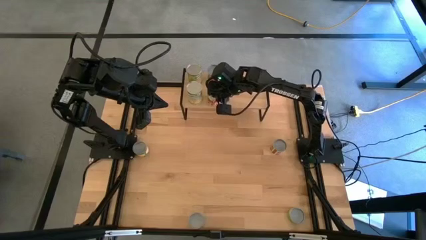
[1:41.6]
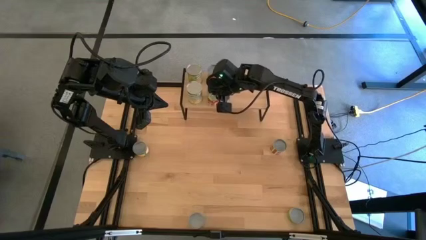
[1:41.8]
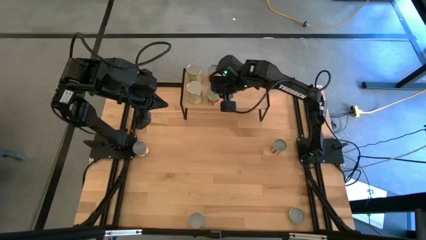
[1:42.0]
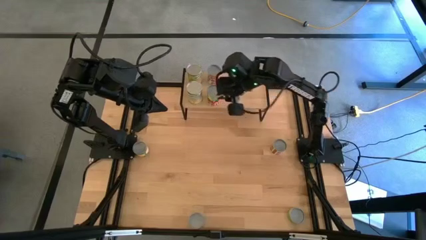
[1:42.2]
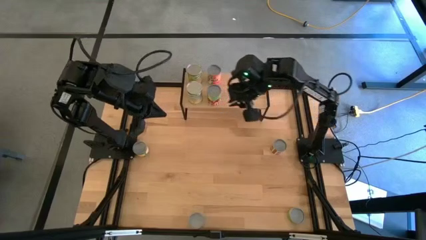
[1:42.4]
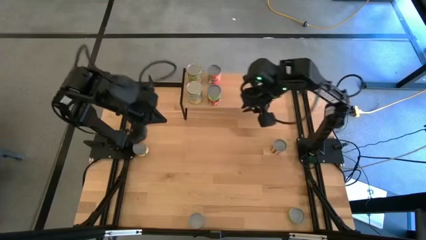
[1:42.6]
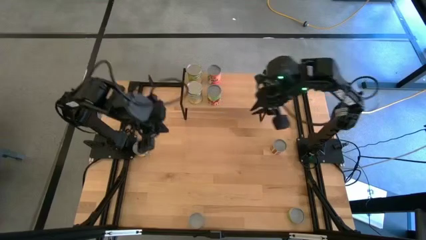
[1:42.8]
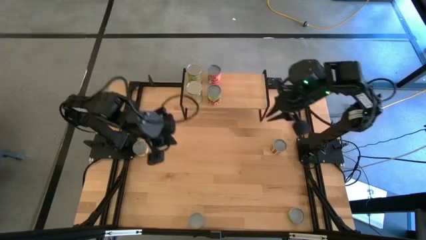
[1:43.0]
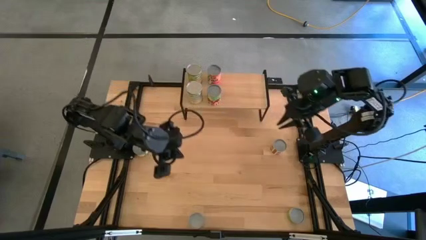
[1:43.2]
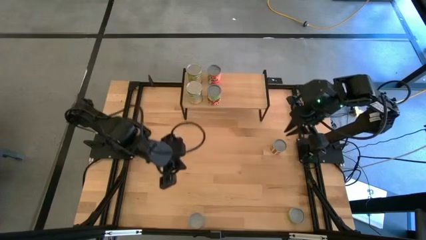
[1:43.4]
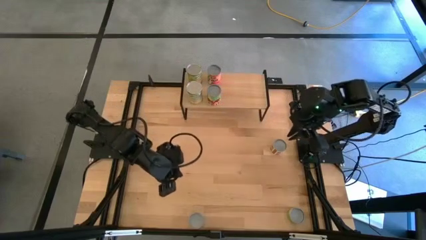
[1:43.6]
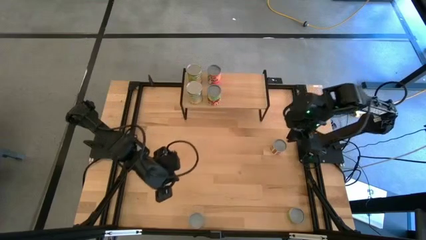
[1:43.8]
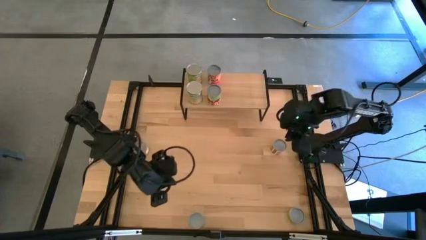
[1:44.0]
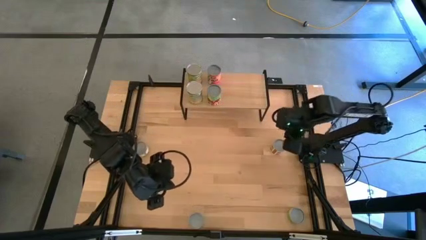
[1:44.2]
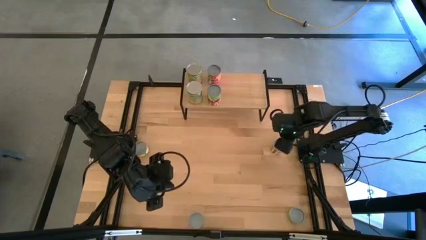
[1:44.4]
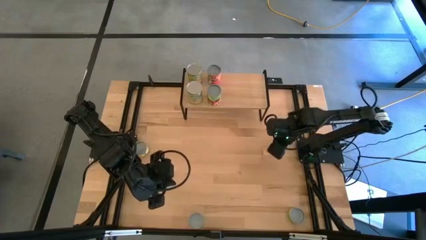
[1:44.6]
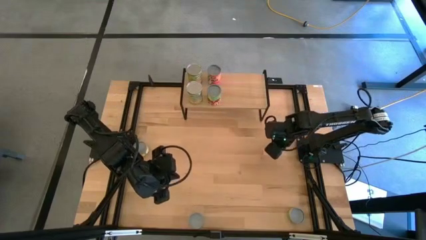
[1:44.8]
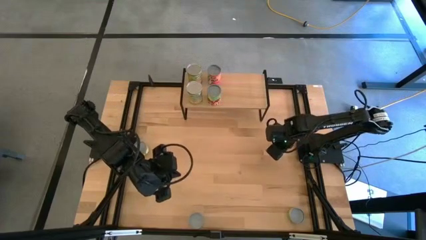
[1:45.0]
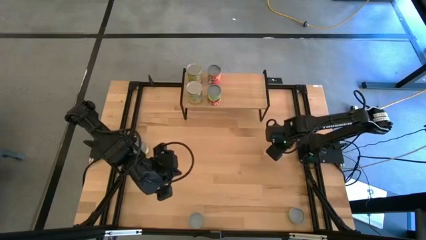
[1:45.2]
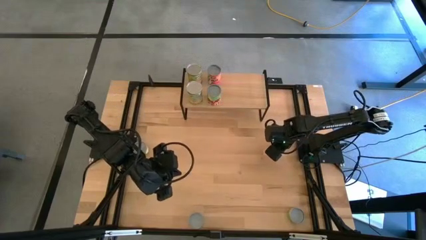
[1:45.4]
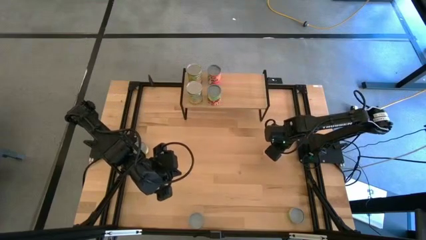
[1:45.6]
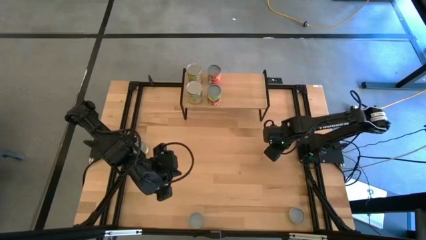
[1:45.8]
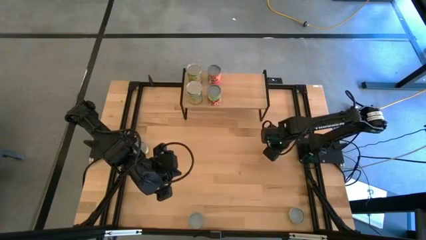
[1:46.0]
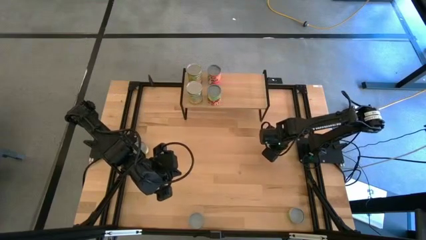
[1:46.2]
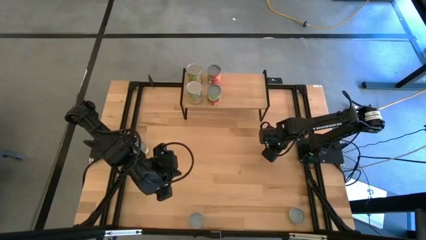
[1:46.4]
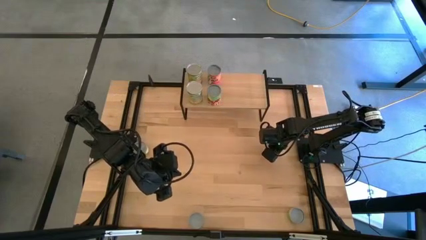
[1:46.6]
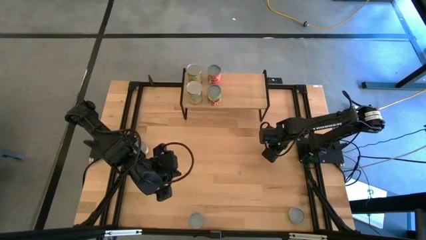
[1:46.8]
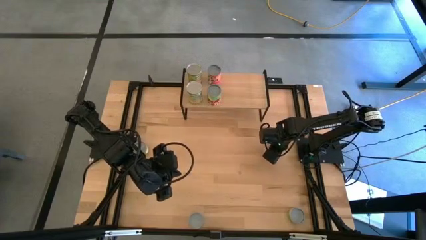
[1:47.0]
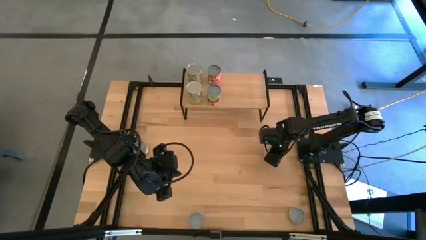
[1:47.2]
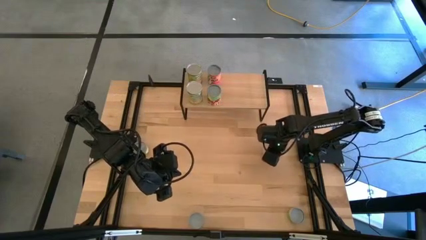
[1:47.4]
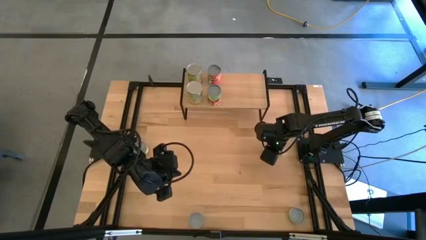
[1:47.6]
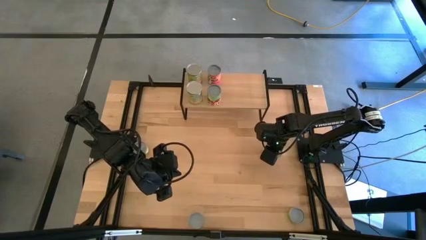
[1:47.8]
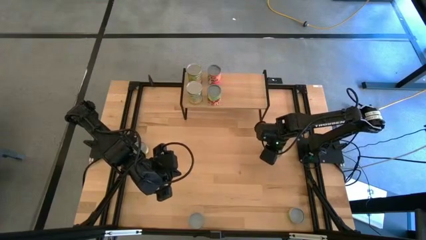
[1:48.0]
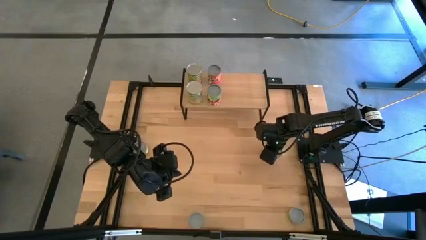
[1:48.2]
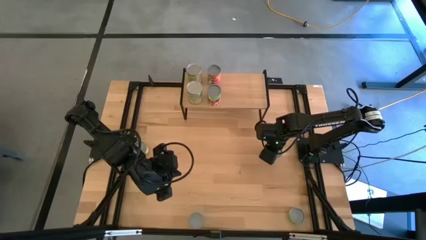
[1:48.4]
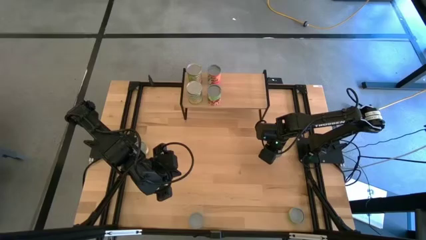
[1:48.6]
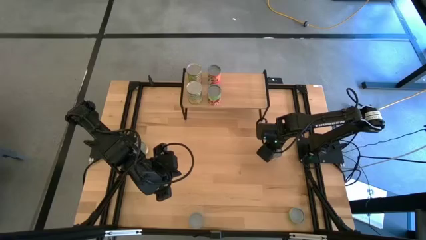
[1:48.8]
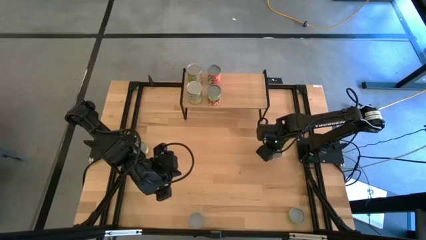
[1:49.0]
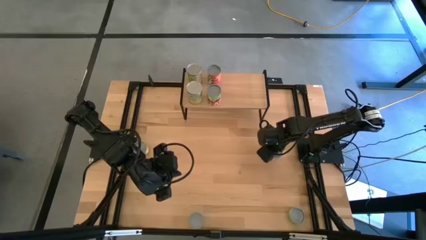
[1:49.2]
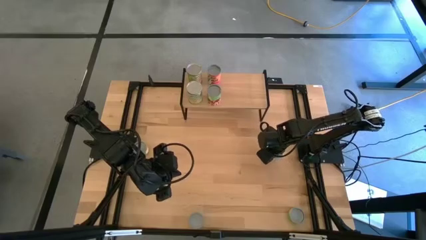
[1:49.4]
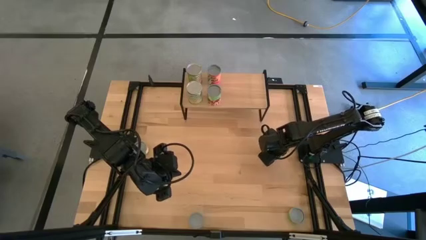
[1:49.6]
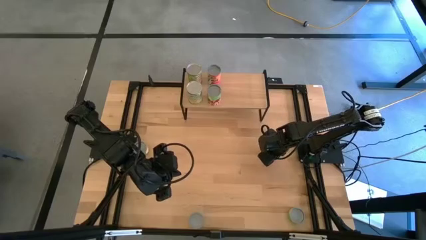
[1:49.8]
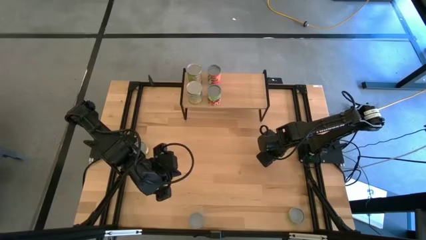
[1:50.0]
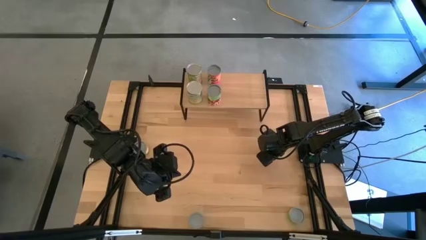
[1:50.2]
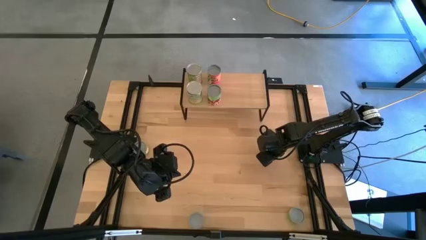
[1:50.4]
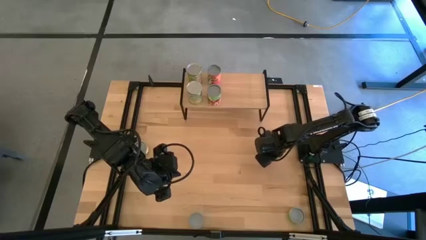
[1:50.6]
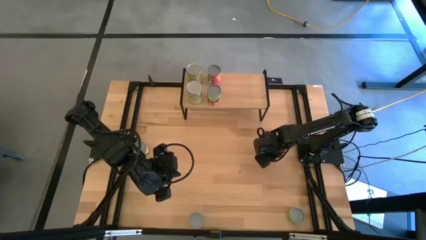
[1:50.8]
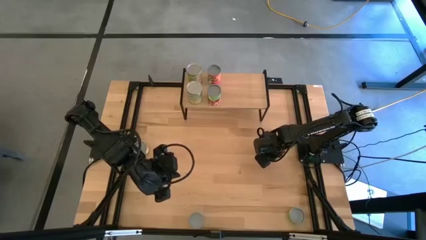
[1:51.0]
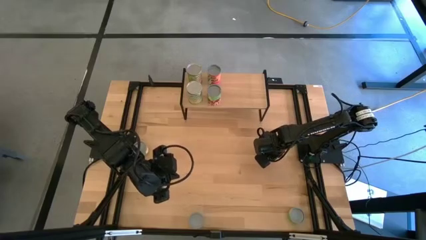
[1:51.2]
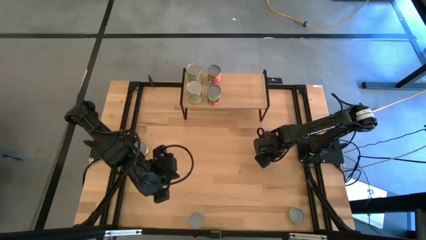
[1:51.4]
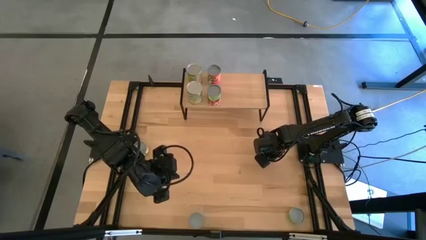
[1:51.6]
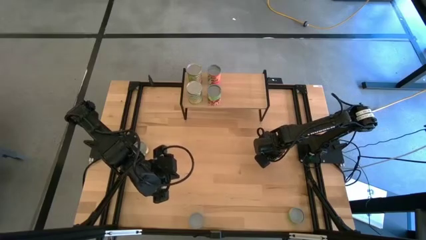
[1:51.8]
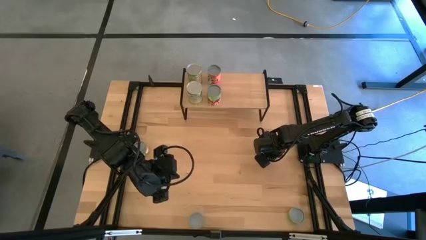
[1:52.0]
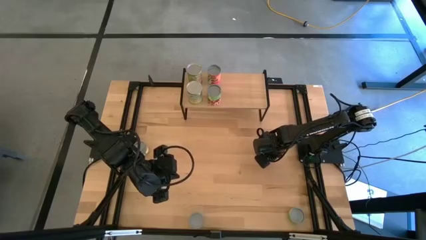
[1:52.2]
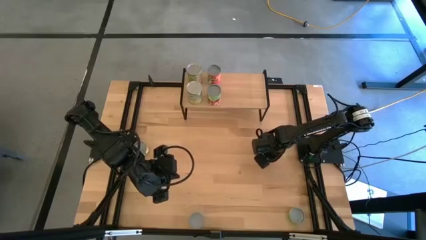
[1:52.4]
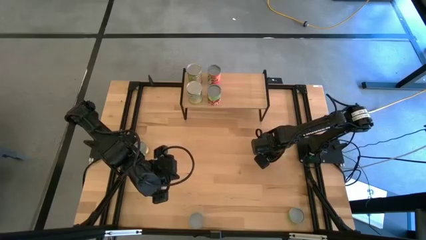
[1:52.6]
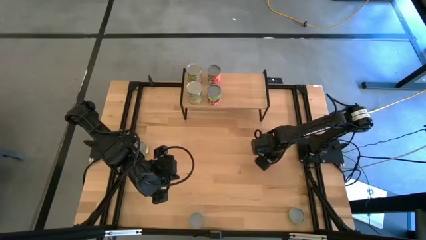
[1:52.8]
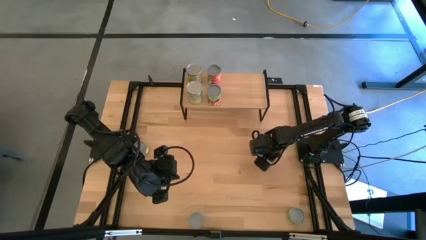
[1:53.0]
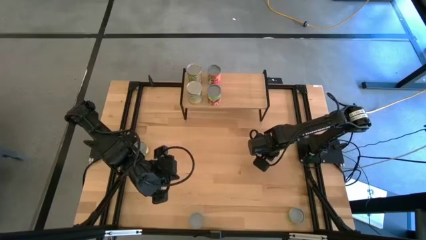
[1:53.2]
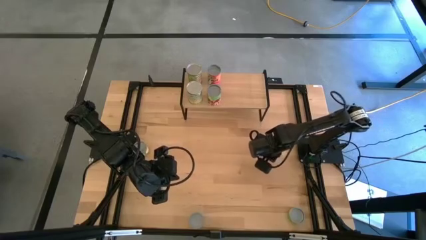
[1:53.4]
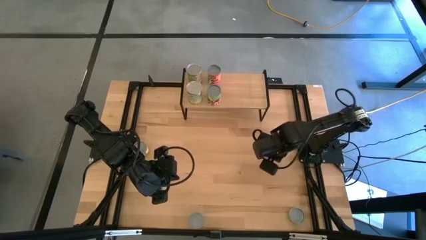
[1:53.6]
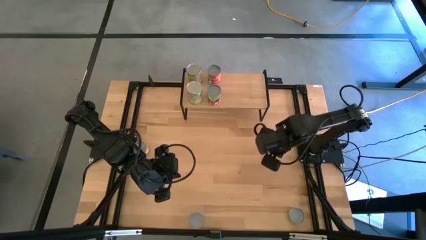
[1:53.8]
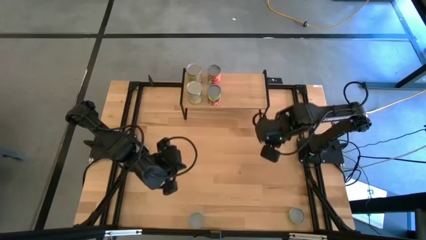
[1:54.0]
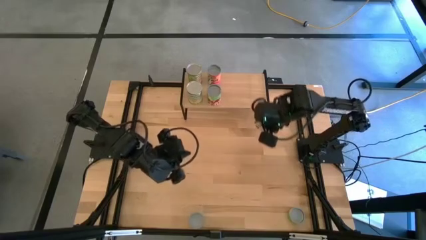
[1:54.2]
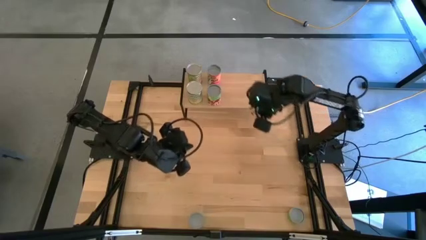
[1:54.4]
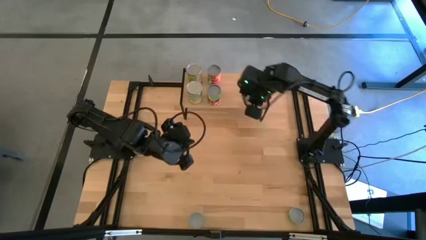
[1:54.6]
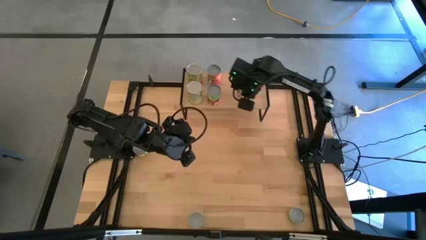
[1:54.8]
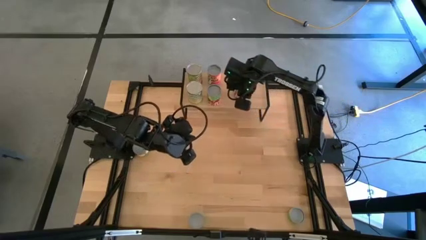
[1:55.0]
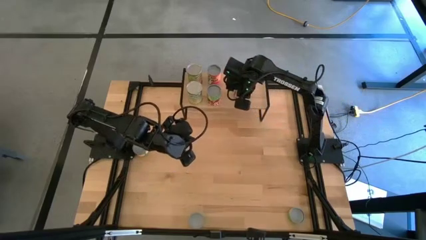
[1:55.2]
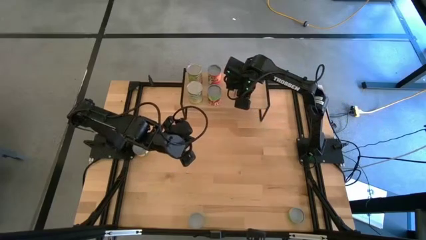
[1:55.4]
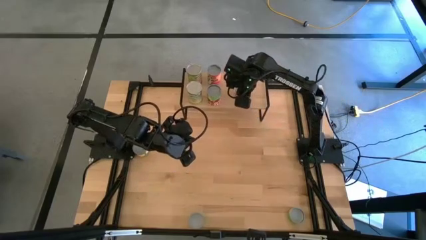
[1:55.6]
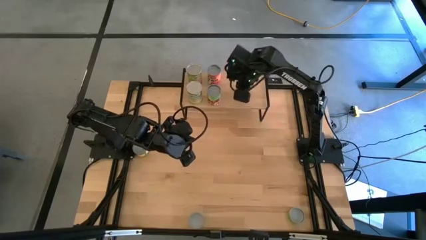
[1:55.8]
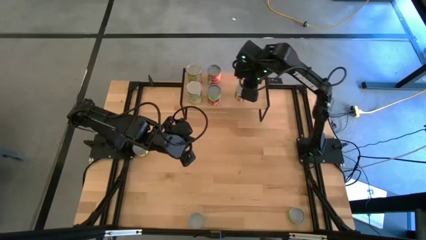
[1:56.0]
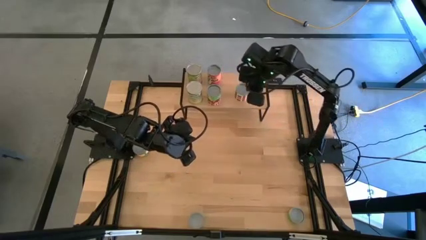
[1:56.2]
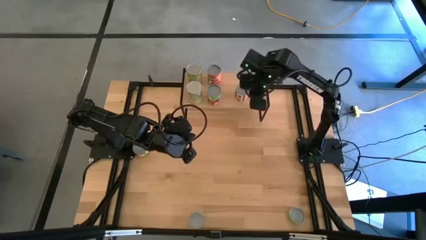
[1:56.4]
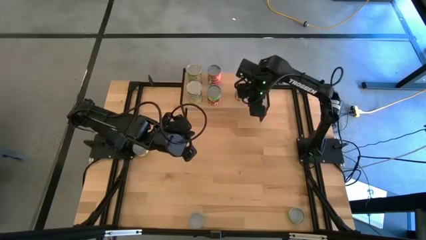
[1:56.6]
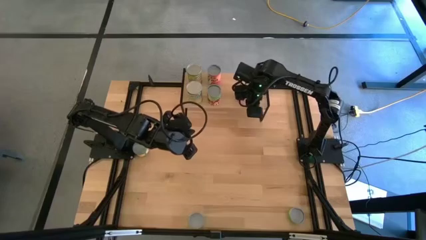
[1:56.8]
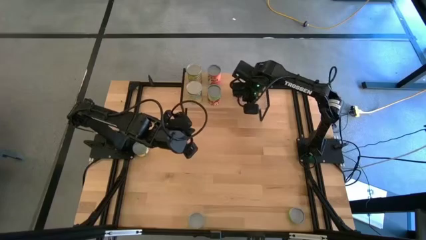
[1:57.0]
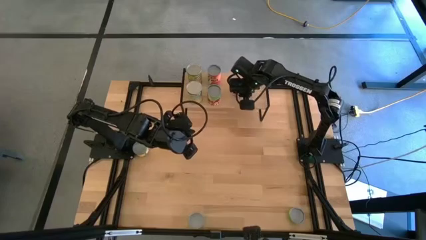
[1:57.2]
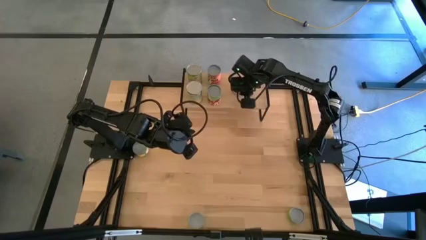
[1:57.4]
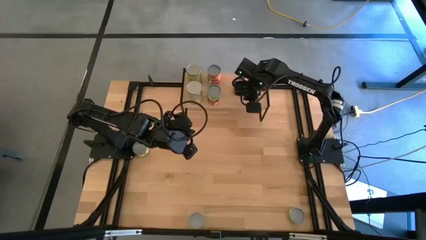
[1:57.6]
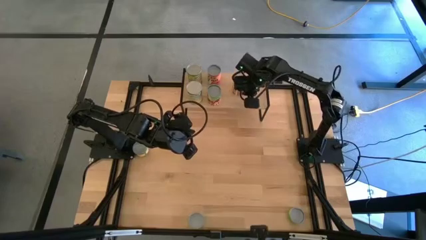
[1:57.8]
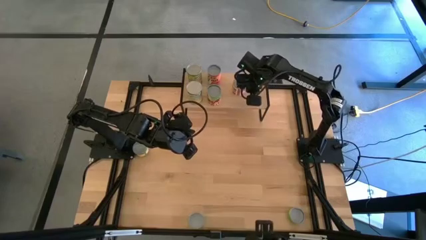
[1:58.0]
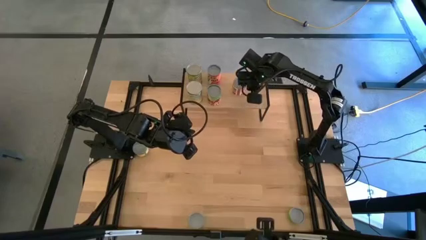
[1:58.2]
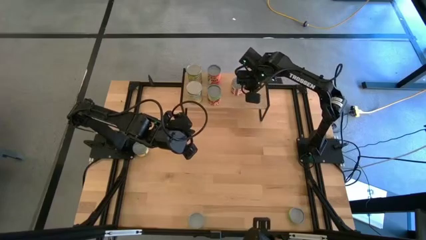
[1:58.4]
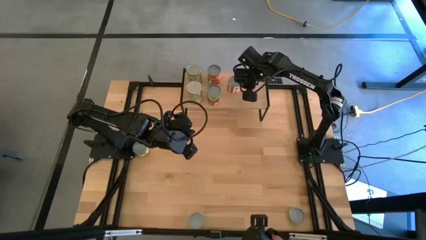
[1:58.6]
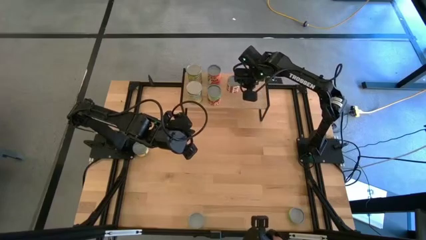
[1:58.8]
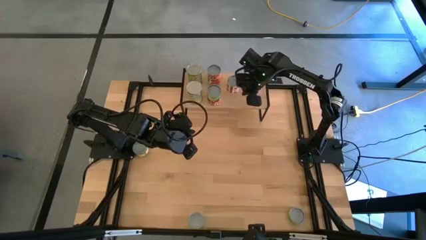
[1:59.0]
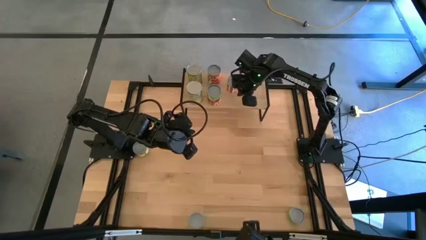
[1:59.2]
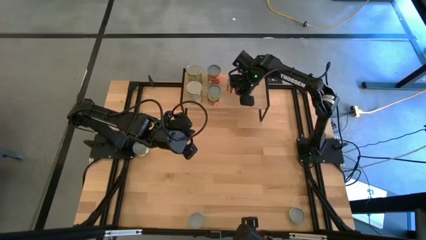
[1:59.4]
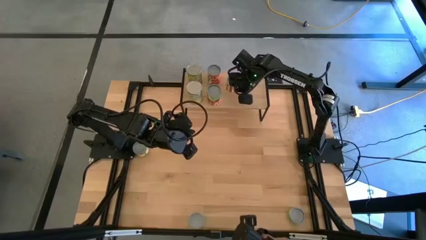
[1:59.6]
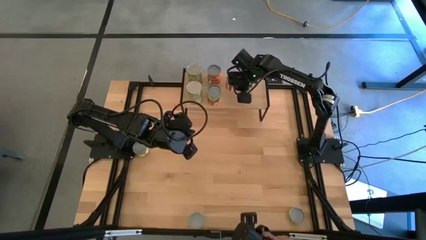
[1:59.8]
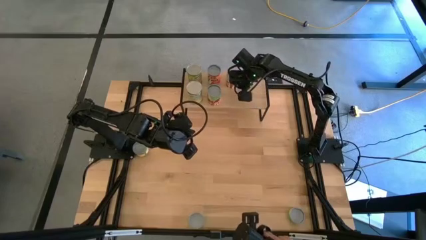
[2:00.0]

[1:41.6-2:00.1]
Task: Pick and place cans onto a shelf
Put the canned tomatoes on the shelf
